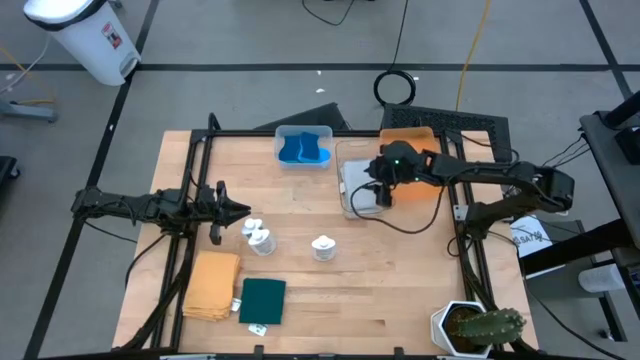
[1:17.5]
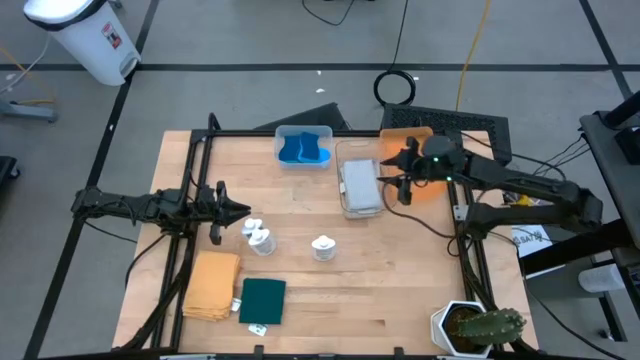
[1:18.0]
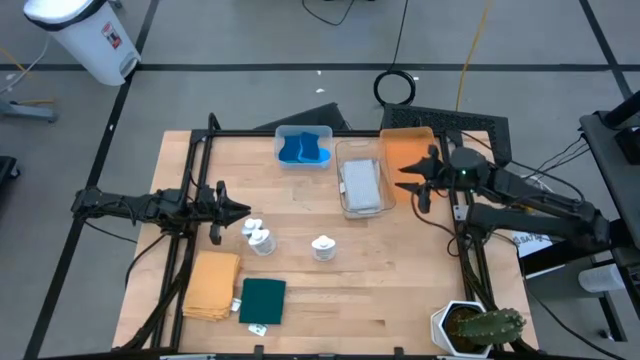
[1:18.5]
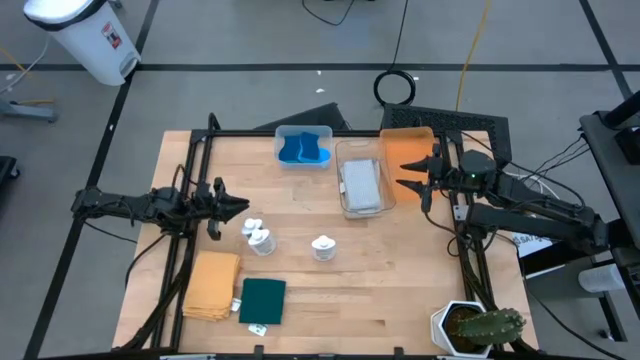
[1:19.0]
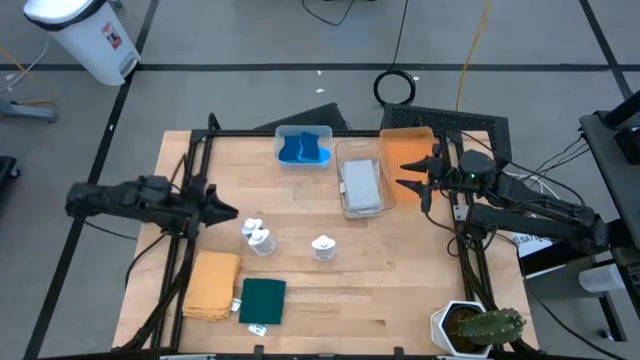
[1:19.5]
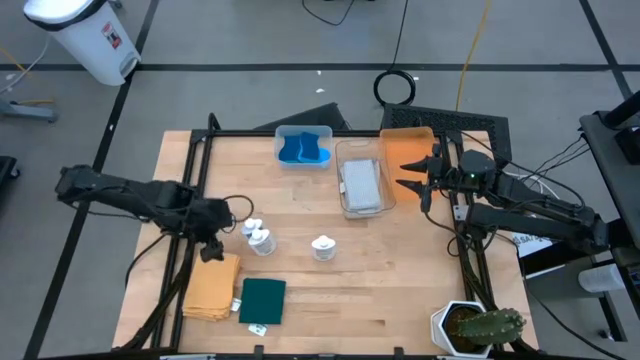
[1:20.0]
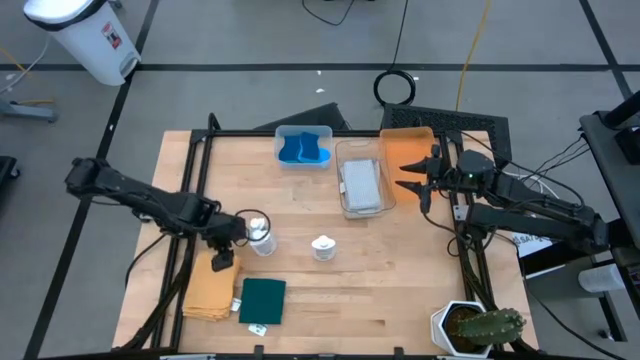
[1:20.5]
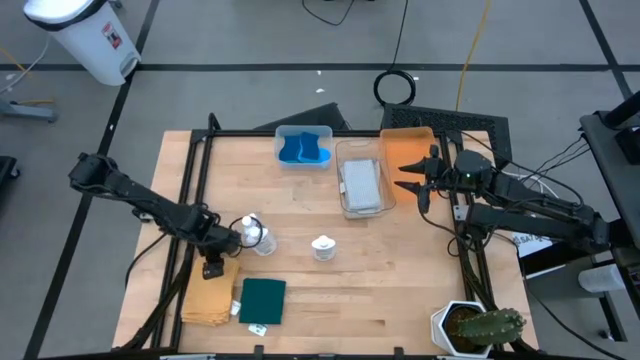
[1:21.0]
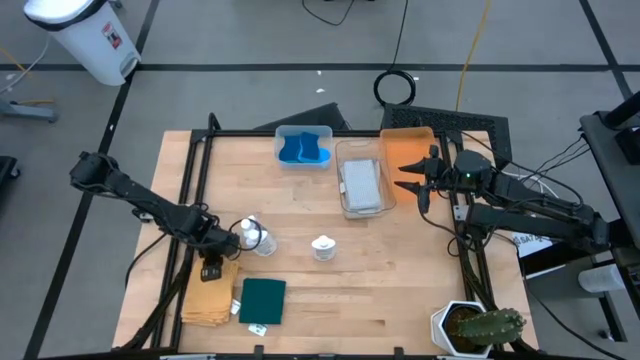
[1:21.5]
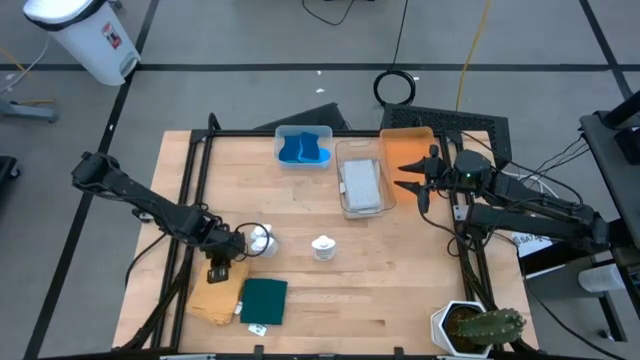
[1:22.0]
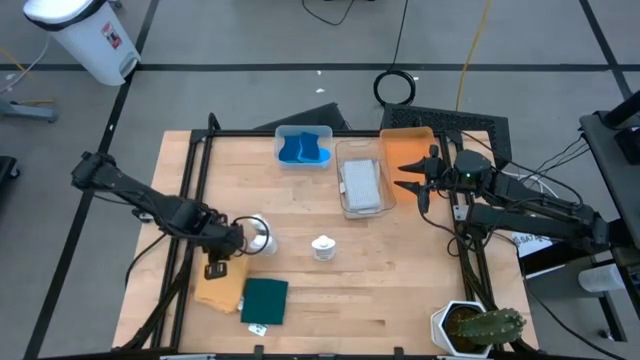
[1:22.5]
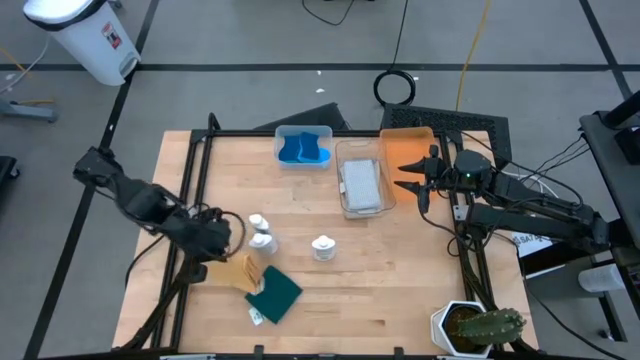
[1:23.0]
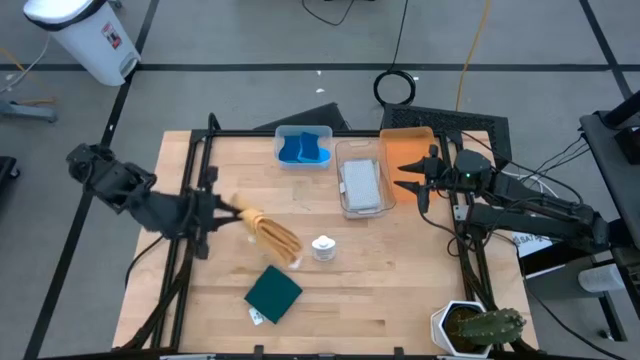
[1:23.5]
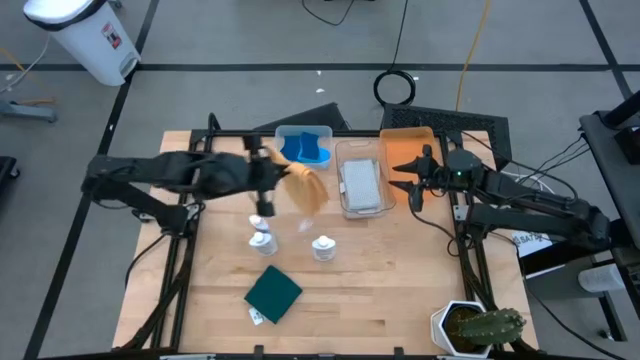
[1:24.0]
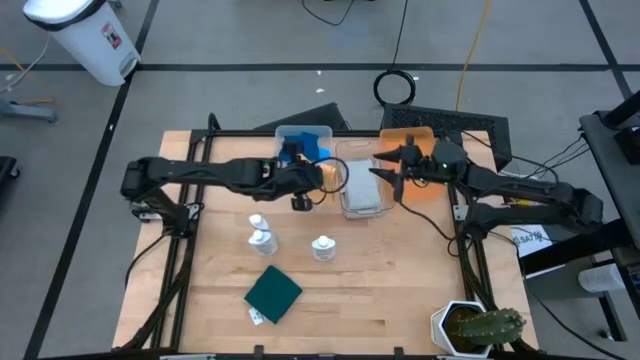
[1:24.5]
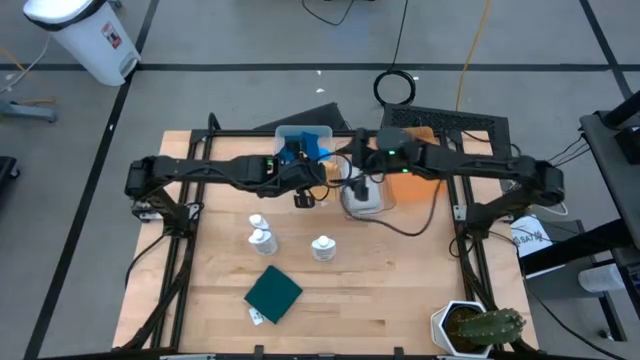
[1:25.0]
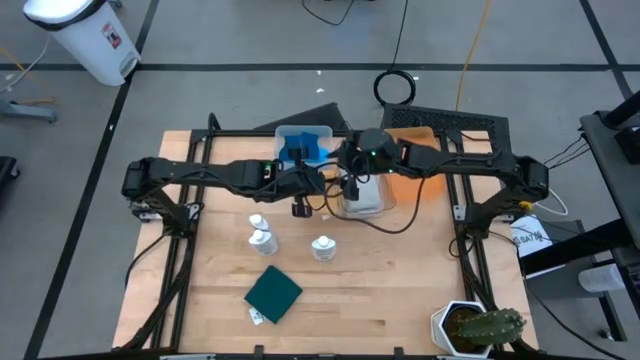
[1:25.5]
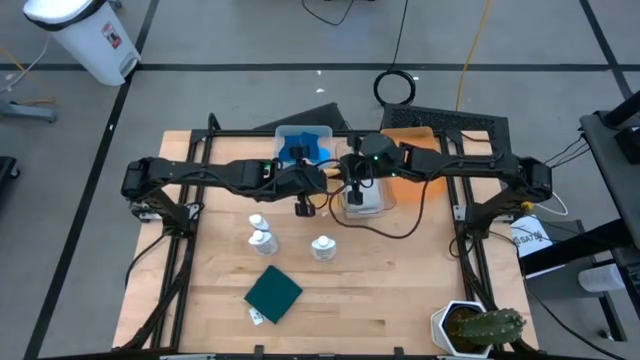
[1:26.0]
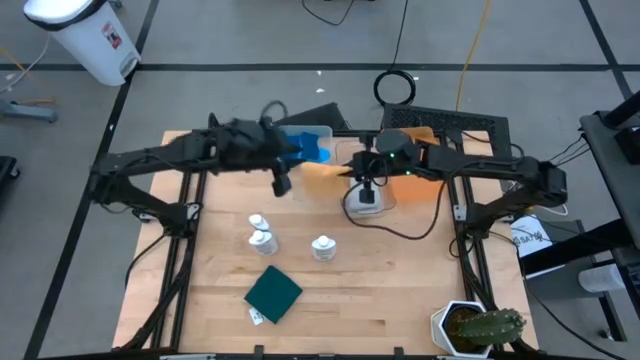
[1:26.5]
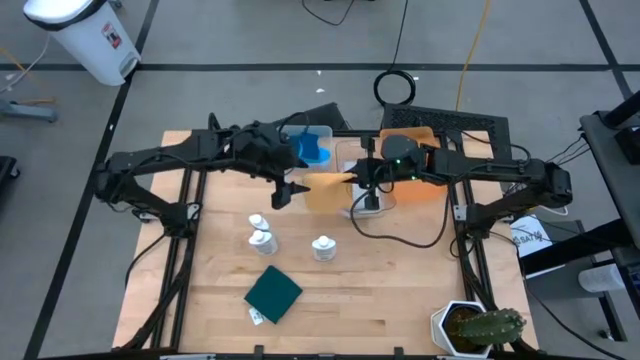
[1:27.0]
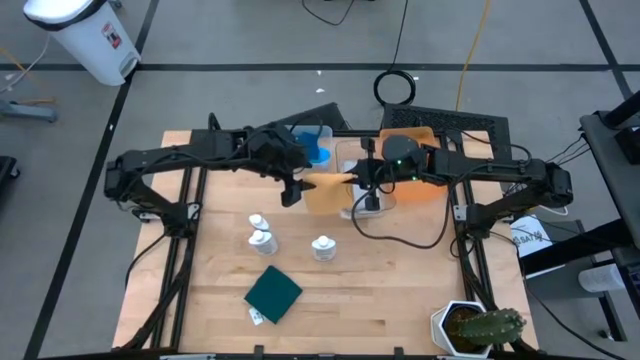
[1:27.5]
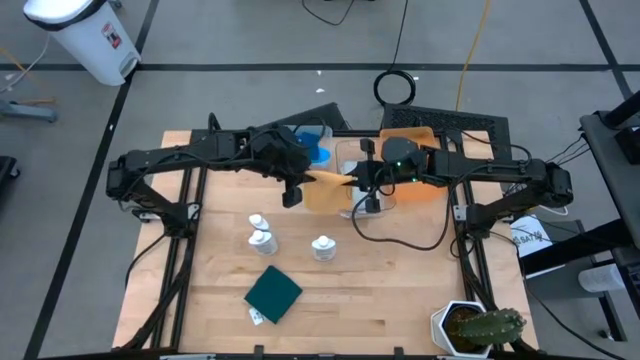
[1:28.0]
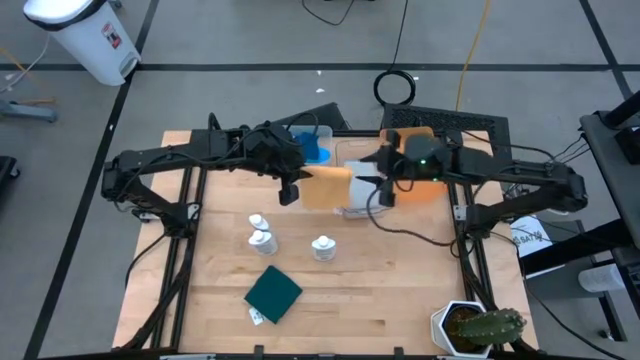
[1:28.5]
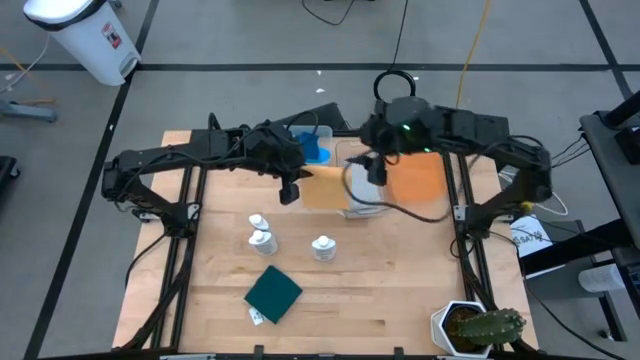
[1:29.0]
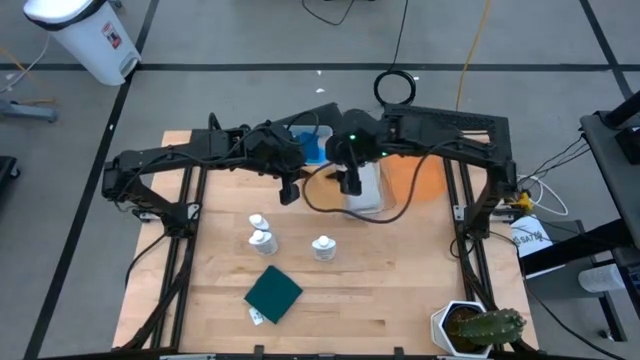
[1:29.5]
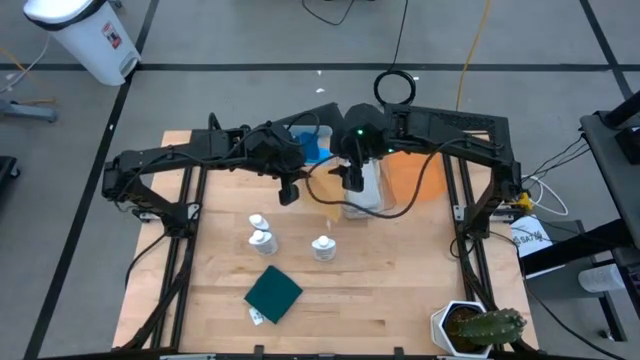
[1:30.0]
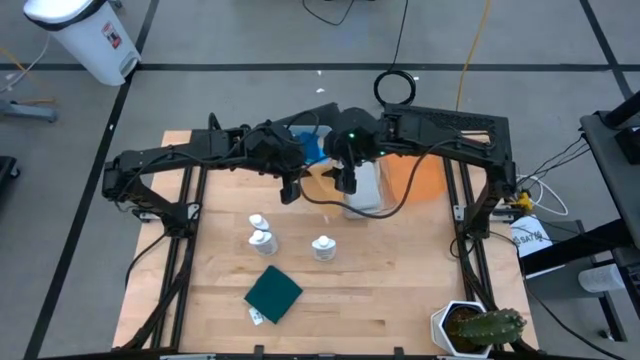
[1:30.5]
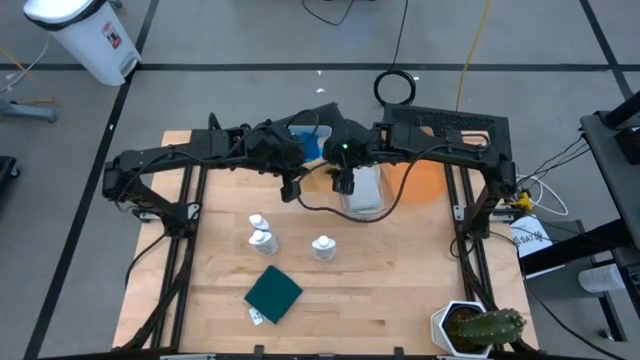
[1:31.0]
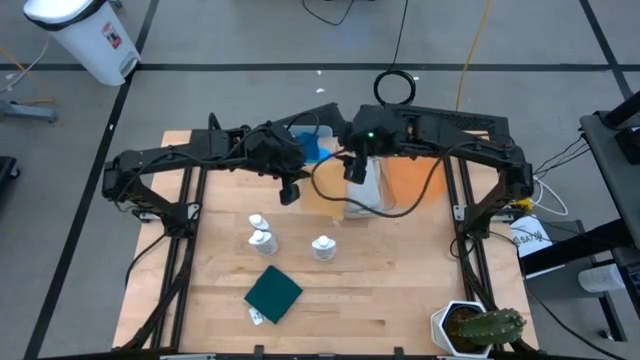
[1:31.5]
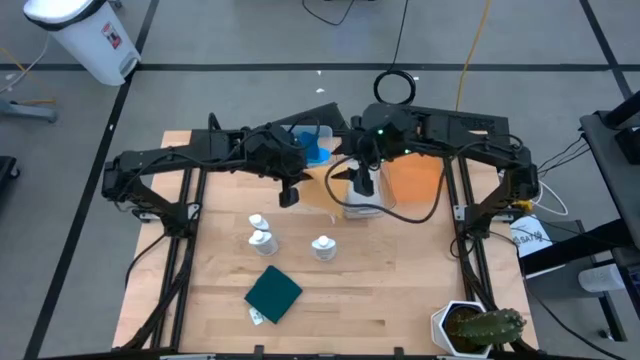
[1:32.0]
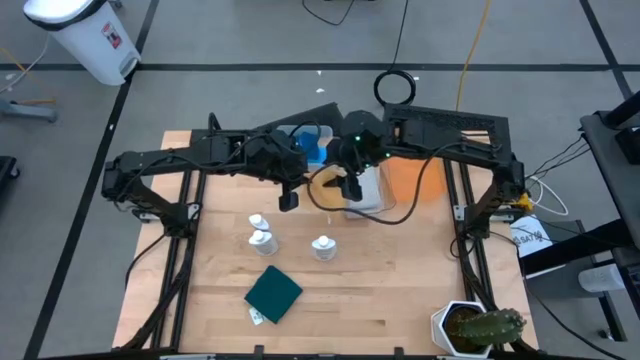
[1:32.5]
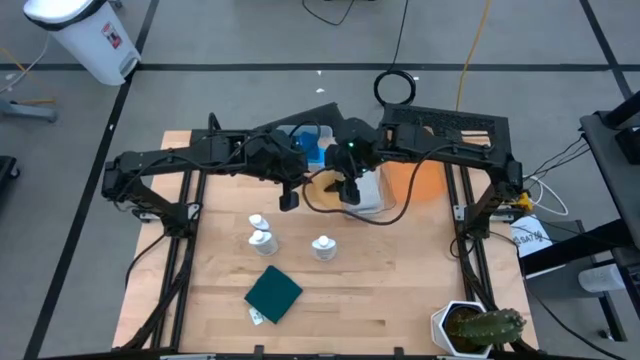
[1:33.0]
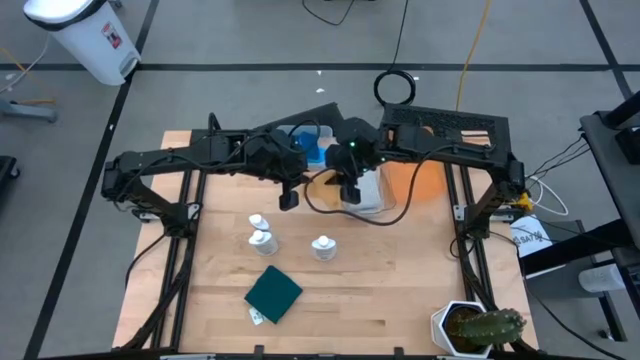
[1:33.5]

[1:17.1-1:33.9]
Task: Pick & Place Kitchen Items
Put the yellow towel into the transparent bin

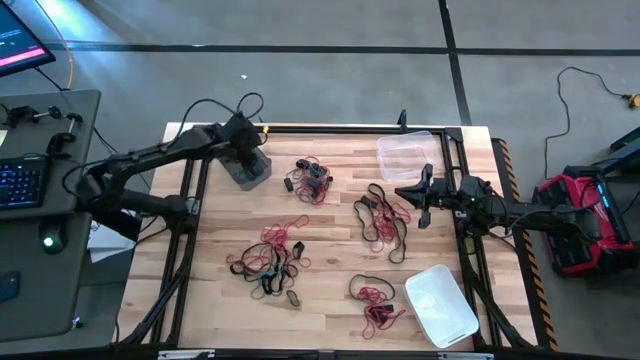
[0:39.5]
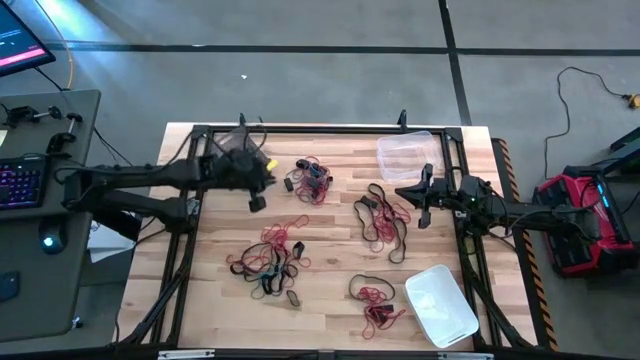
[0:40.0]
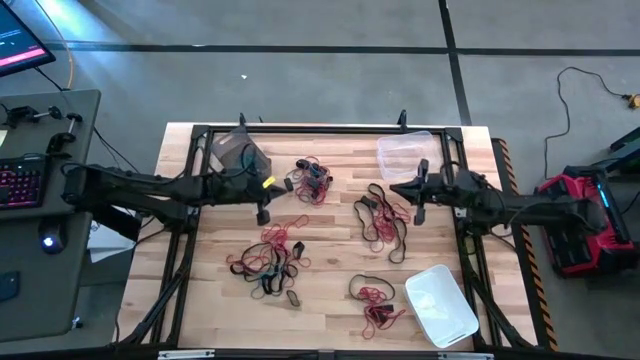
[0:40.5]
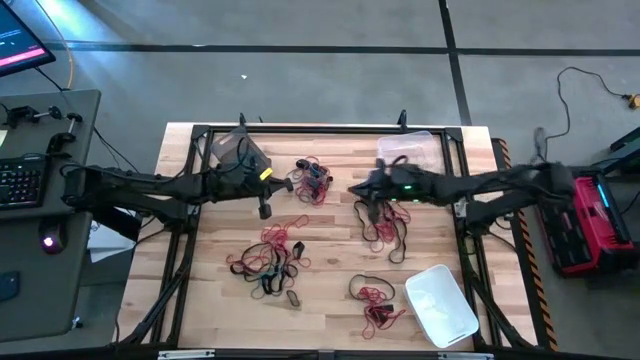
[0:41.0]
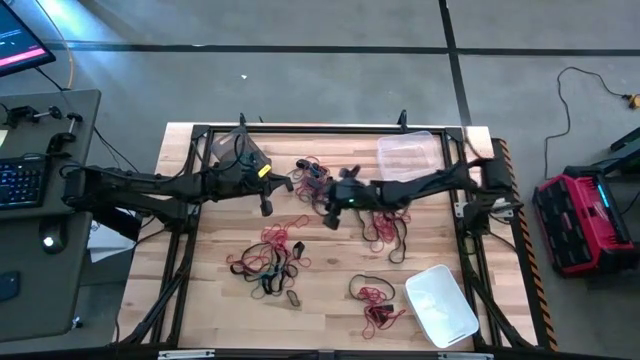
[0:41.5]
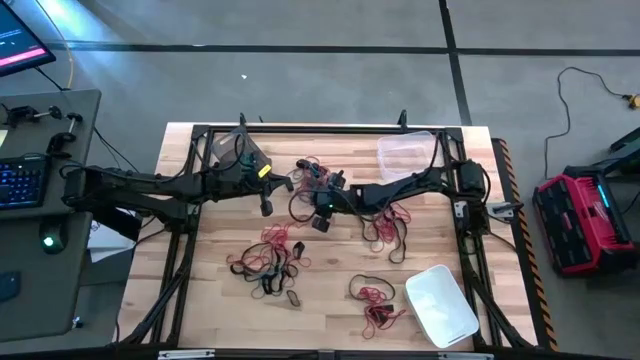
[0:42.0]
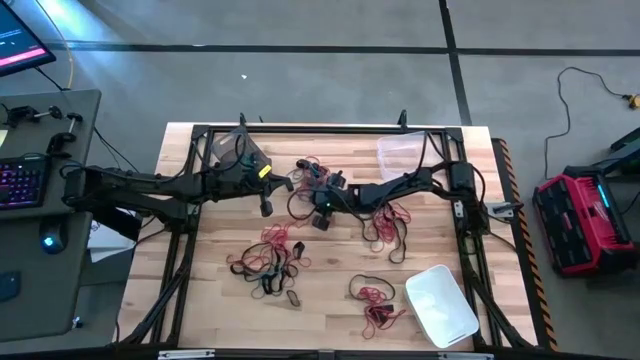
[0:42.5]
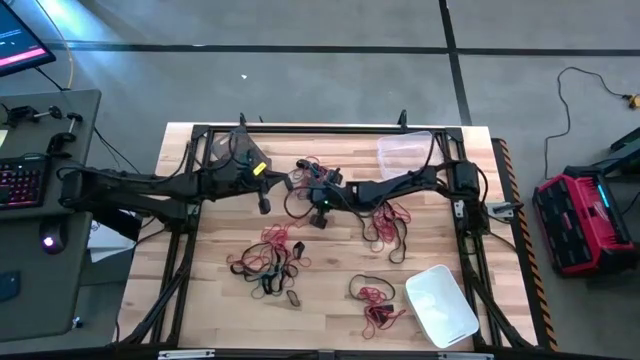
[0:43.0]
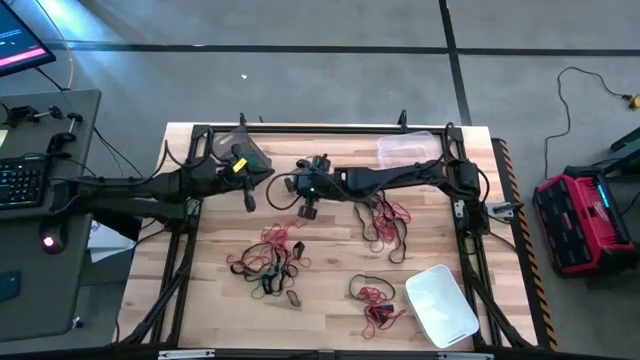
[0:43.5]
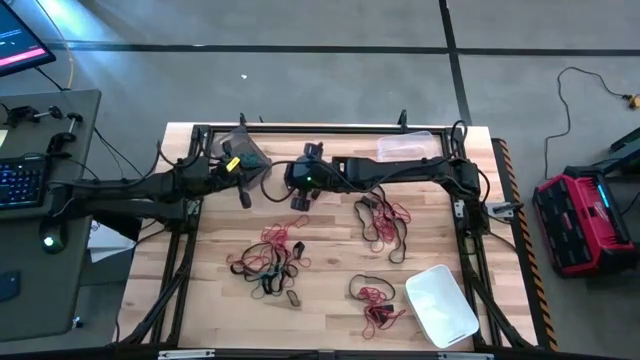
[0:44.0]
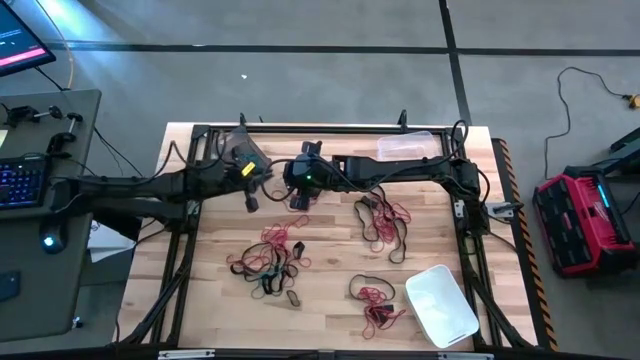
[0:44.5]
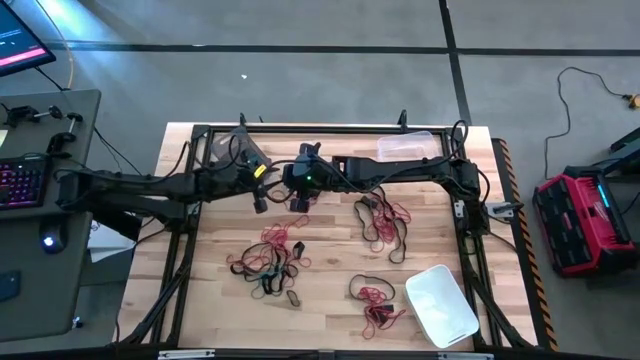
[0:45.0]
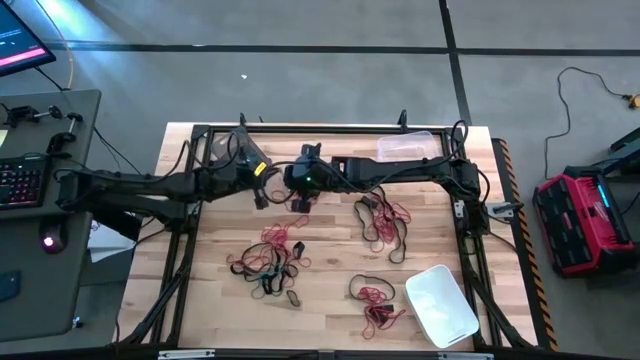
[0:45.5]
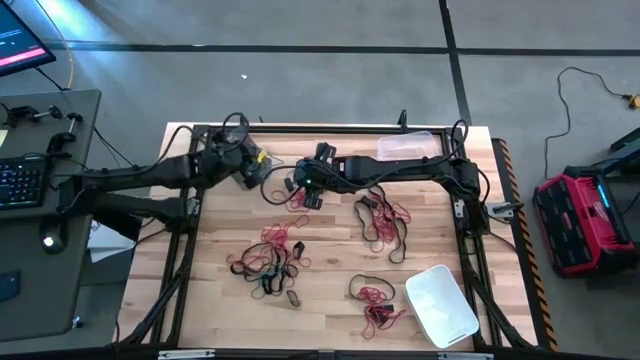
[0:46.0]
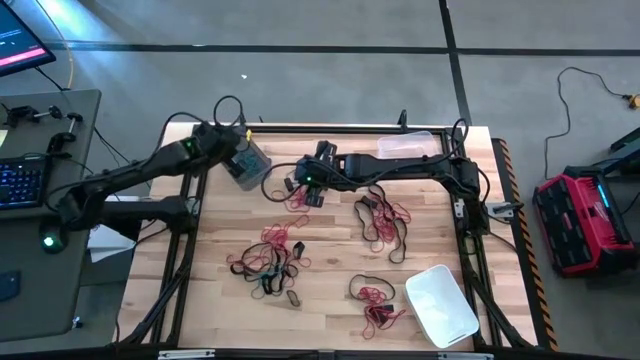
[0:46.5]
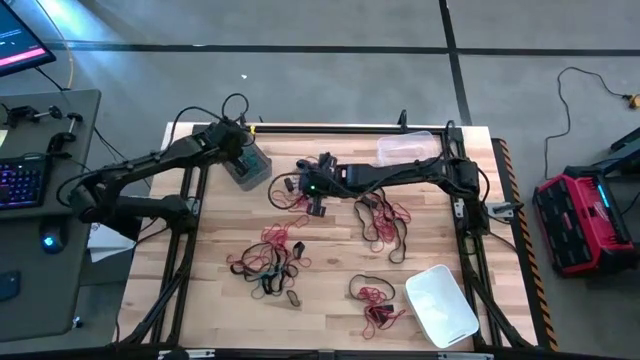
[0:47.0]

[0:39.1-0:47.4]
Task: Sort rubber bands into baskets
Put the blue rubber band into the black bin
